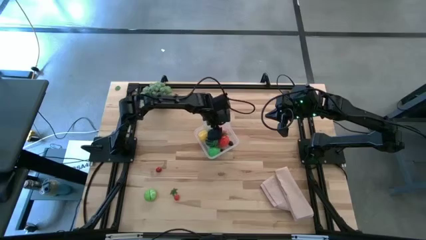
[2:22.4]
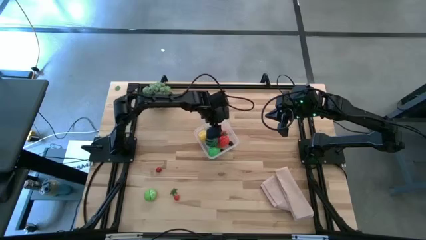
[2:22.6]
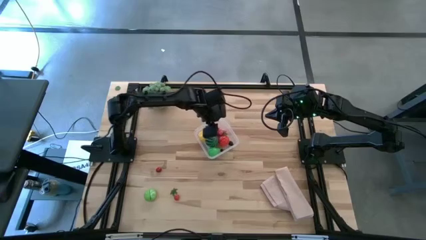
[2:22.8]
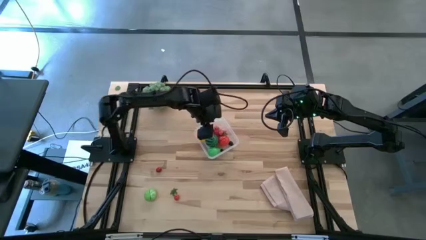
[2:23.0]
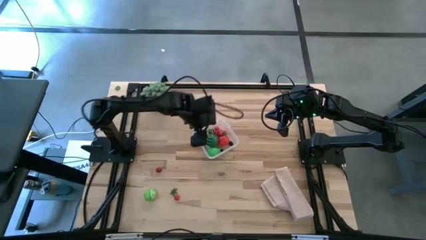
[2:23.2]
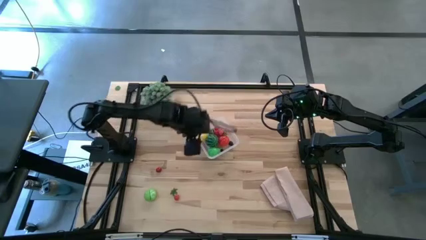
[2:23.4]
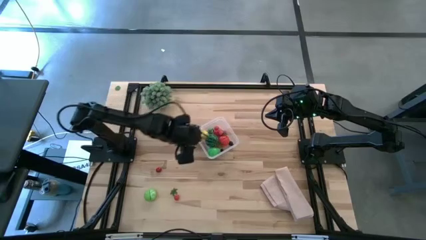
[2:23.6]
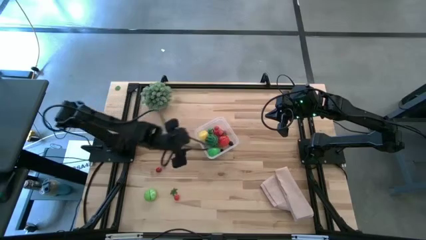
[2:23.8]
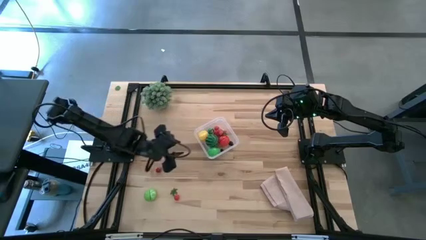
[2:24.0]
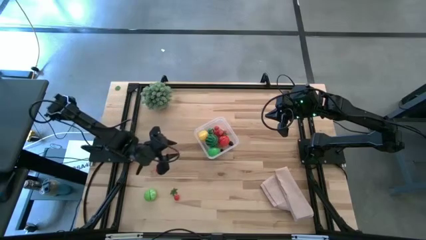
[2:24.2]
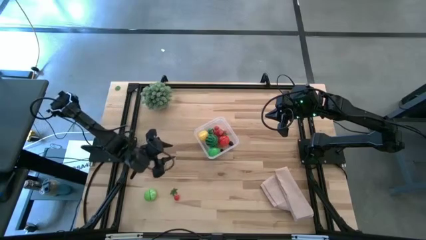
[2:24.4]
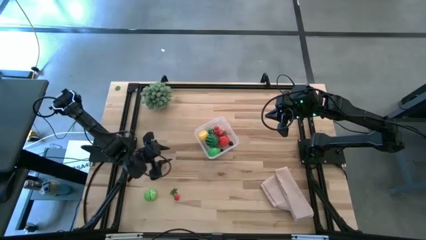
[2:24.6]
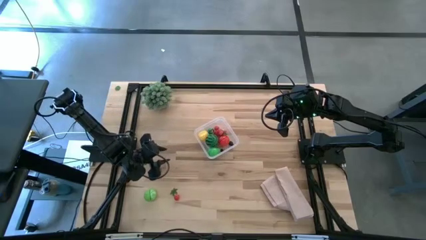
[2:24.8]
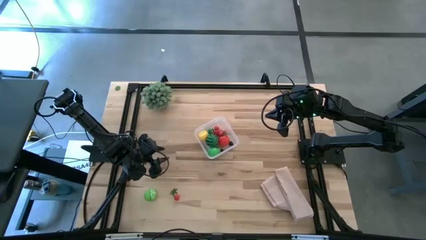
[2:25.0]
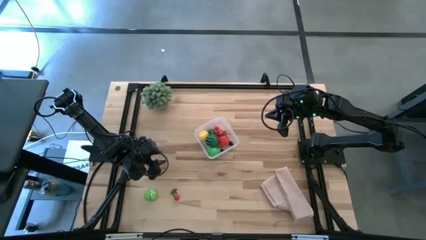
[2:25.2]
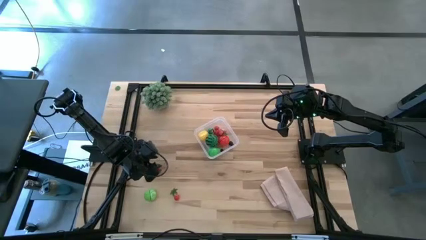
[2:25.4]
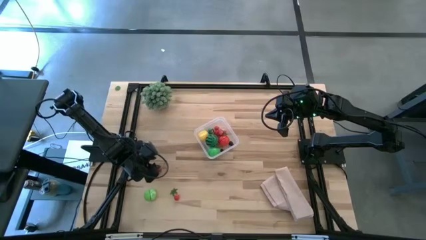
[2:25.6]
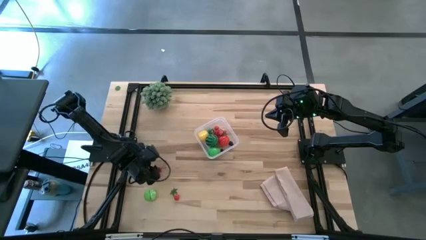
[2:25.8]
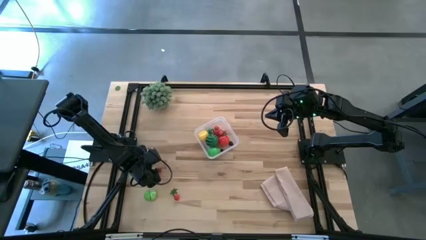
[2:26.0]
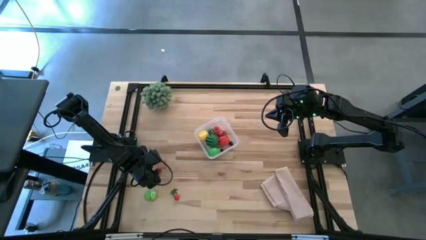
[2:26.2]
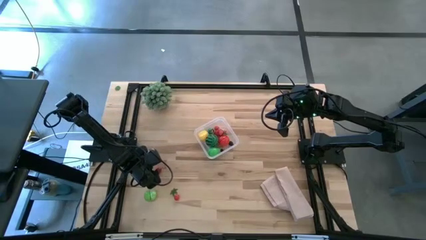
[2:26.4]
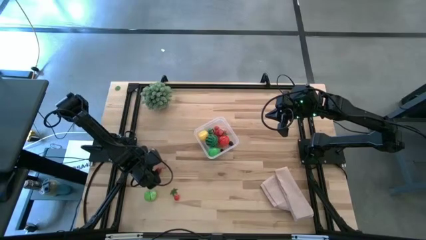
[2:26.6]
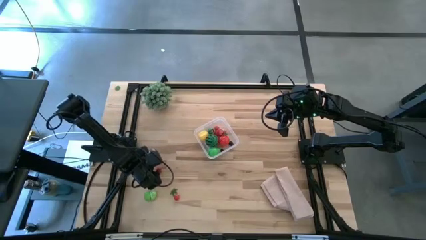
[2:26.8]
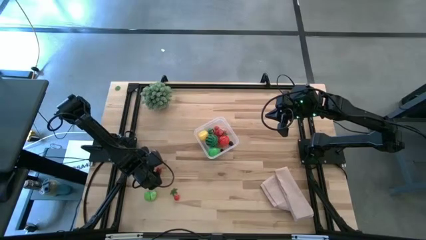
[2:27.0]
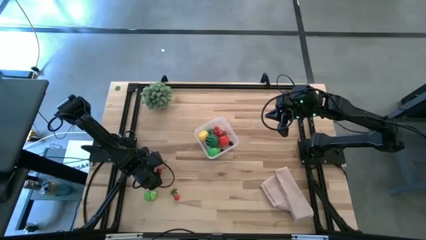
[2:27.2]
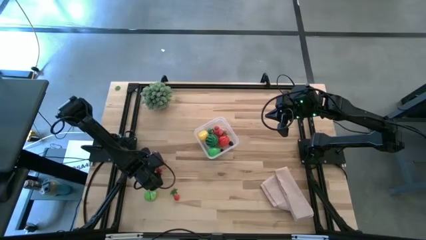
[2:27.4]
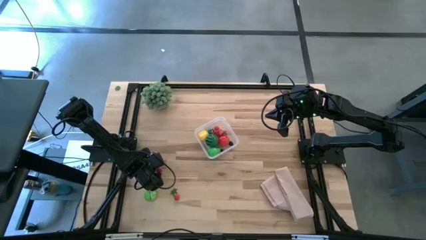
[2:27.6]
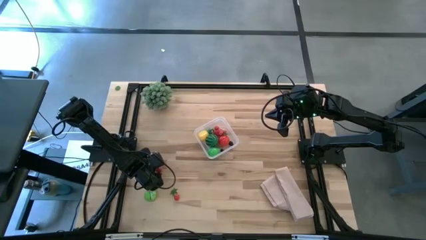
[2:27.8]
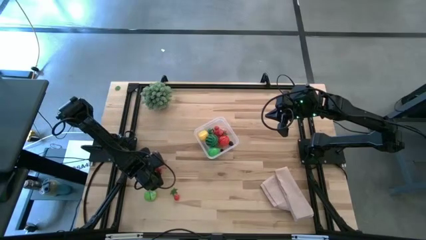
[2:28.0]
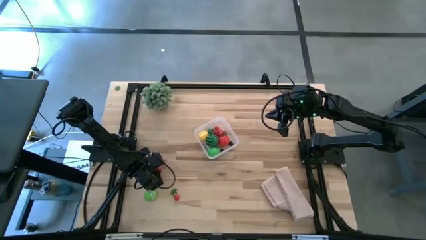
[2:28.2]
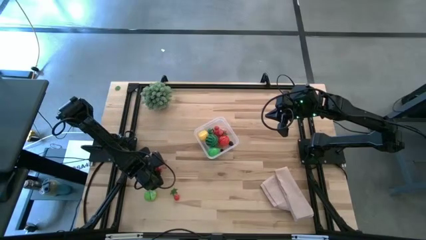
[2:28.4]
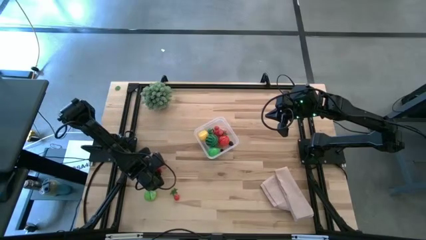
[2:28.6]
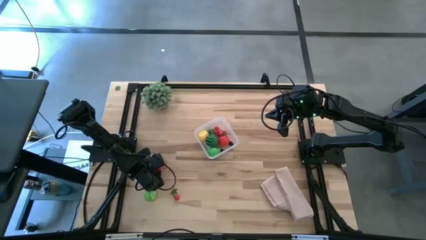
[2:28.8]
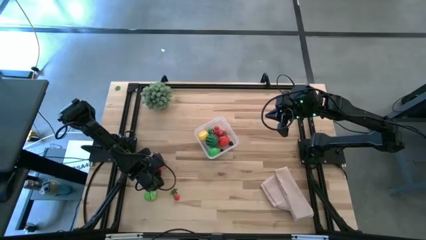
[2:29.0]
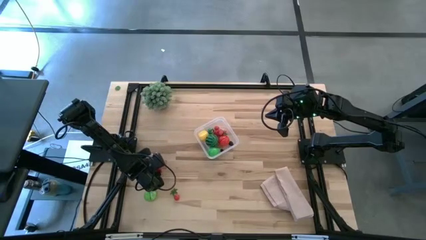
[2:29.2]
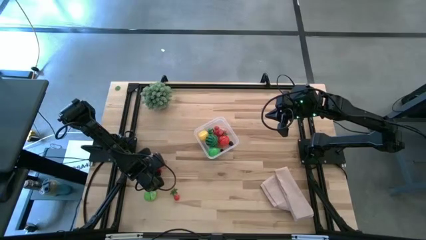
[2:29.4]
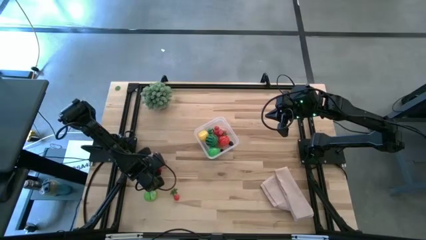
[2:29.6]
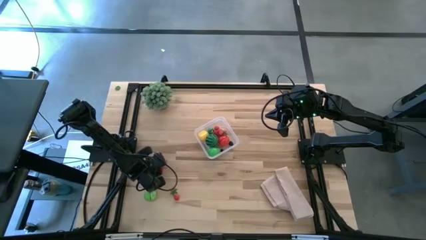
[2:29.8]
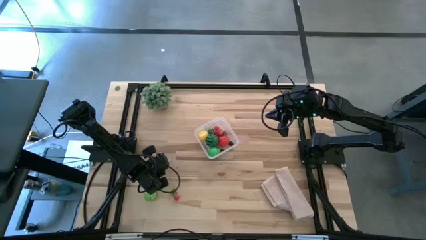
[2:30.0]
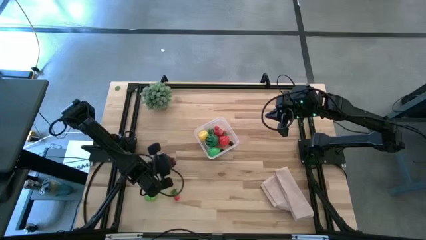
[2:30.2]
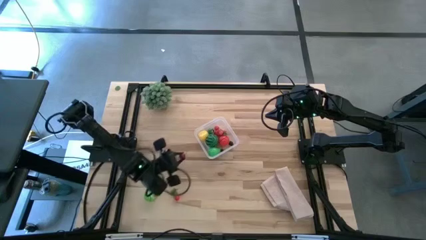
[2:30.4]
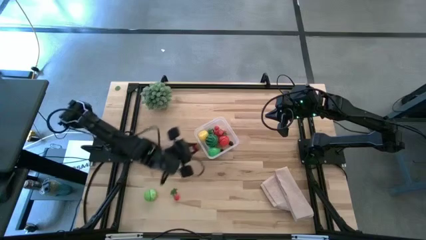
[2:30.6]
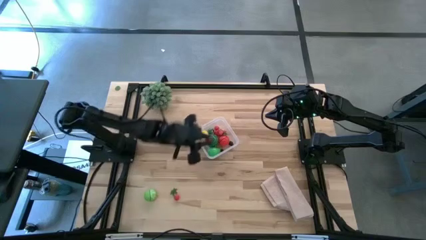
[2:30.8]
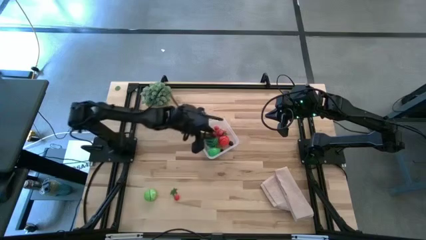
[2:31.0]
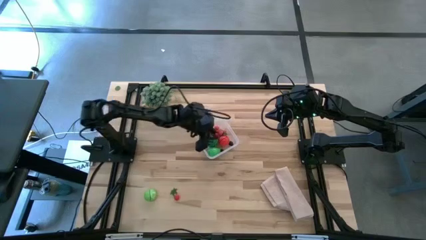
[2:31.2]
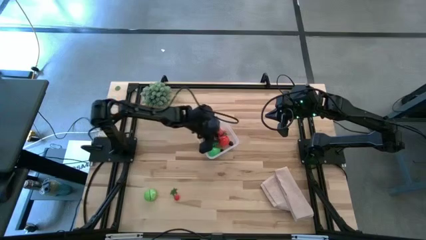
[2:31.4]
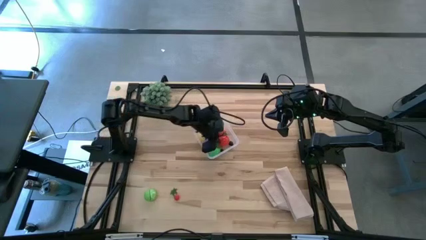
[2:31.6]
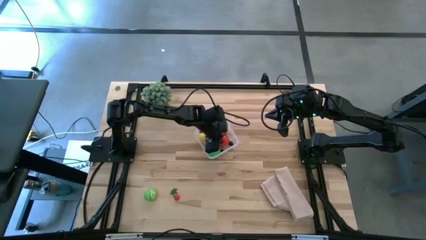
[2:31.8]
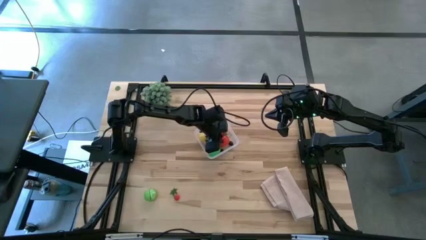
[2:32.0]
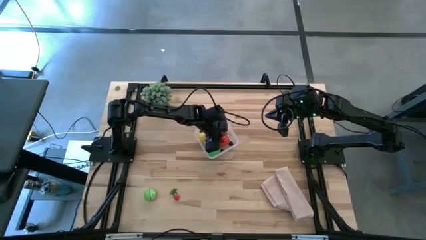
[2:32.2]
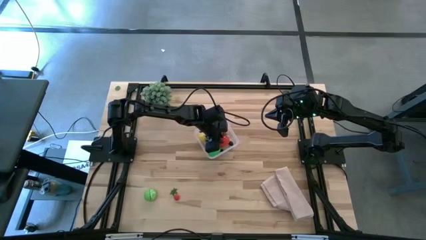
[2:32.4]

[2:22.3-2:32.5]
Task: Pick and placing Produce into tupperware
Put the red cherry into the transparent bin

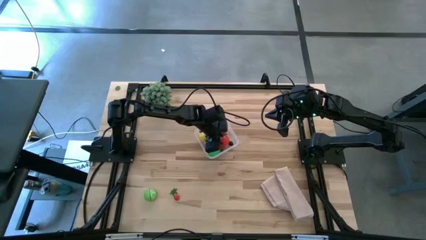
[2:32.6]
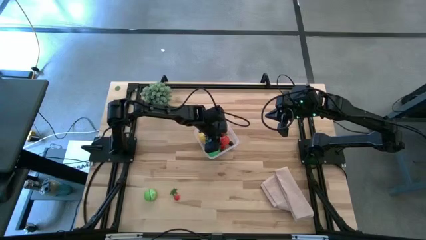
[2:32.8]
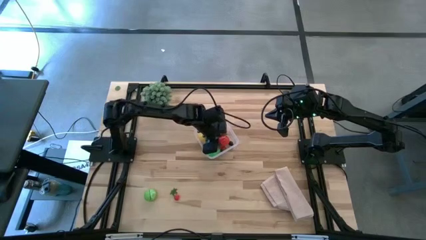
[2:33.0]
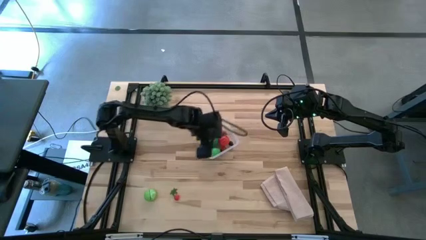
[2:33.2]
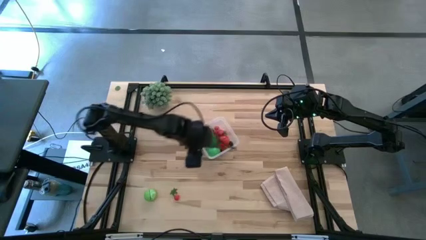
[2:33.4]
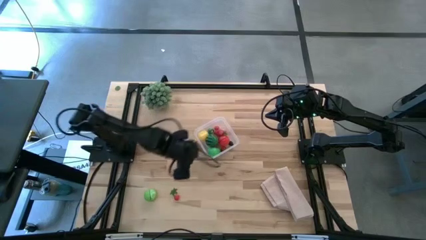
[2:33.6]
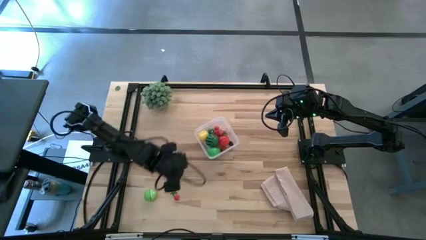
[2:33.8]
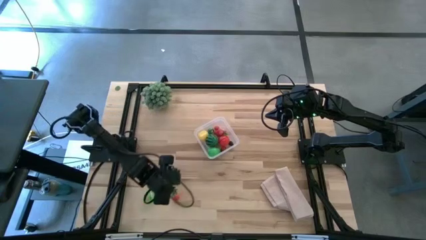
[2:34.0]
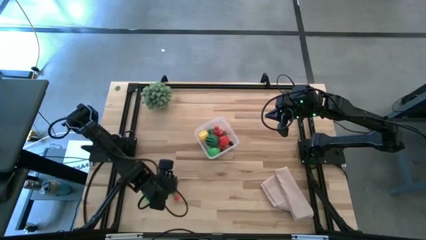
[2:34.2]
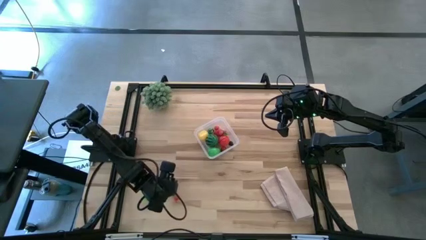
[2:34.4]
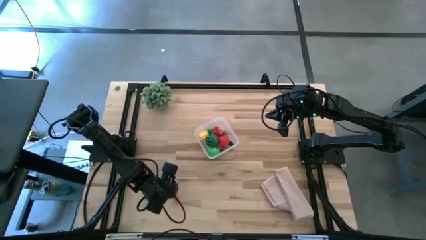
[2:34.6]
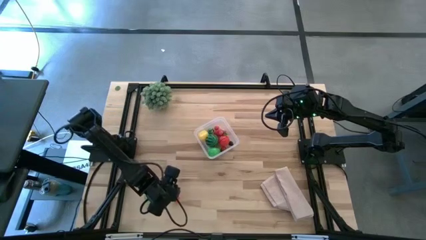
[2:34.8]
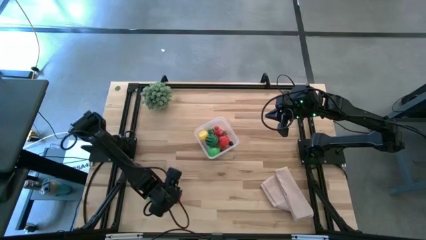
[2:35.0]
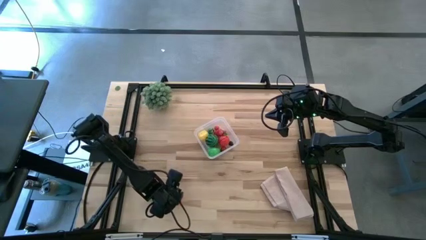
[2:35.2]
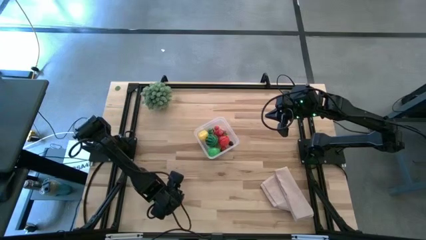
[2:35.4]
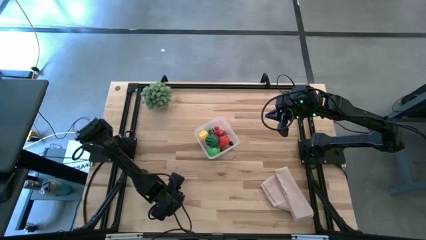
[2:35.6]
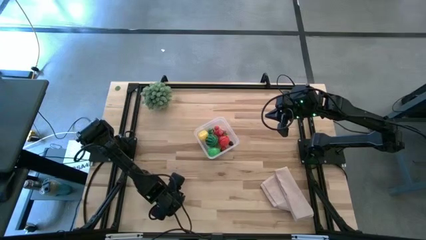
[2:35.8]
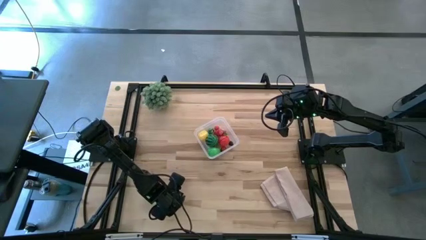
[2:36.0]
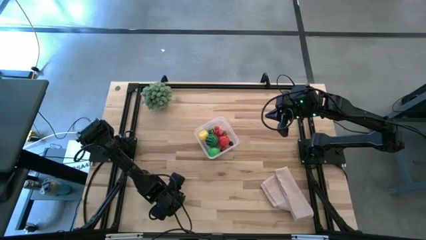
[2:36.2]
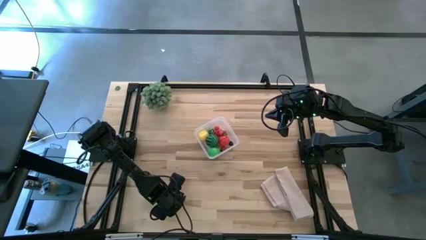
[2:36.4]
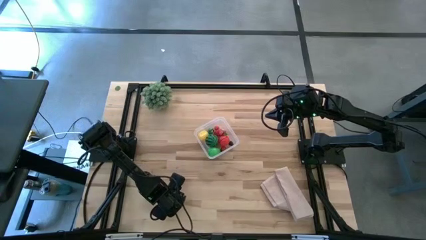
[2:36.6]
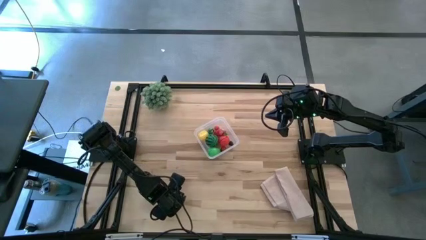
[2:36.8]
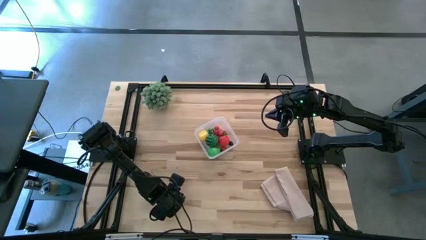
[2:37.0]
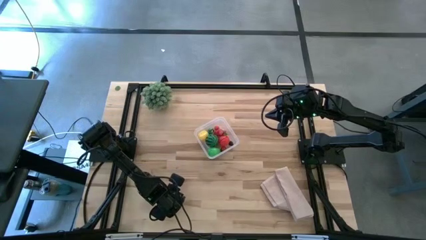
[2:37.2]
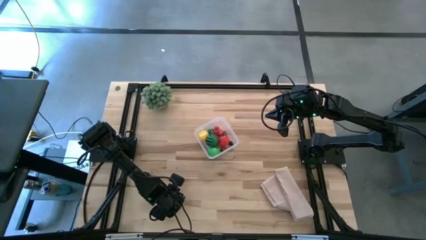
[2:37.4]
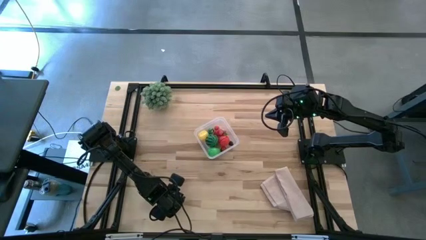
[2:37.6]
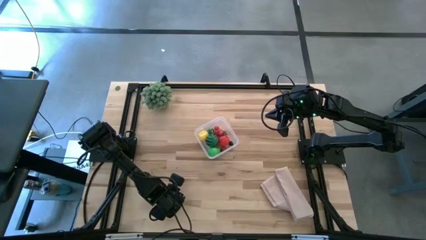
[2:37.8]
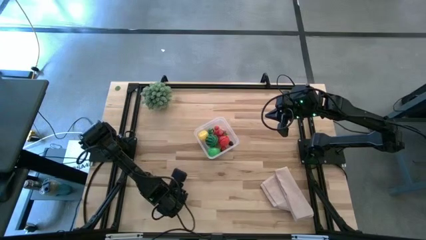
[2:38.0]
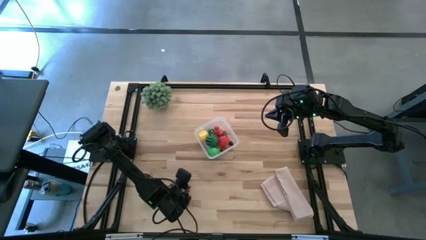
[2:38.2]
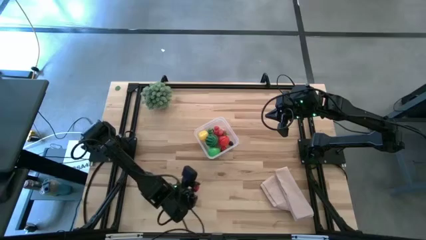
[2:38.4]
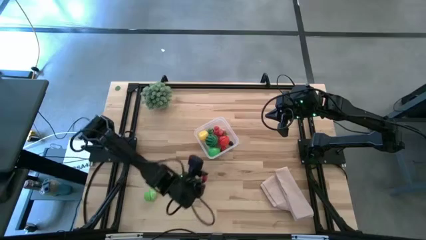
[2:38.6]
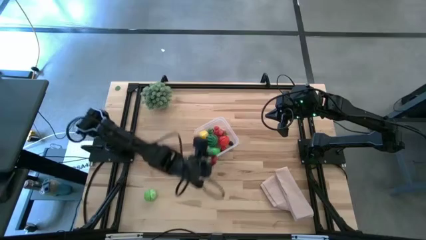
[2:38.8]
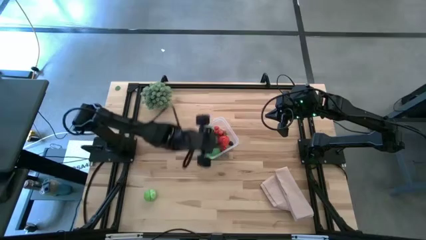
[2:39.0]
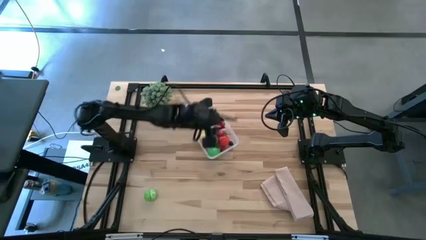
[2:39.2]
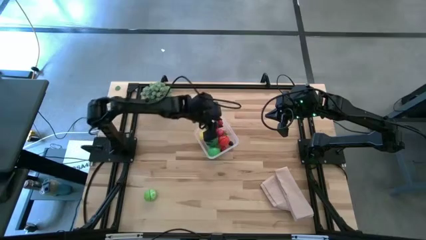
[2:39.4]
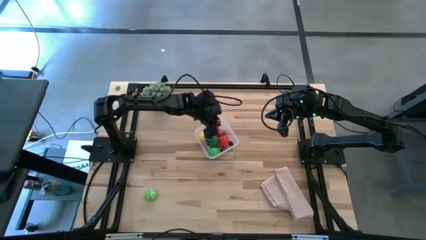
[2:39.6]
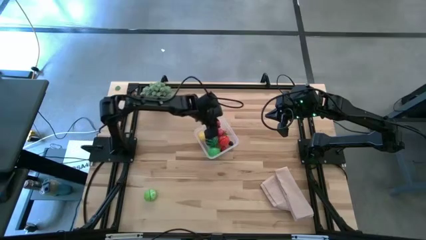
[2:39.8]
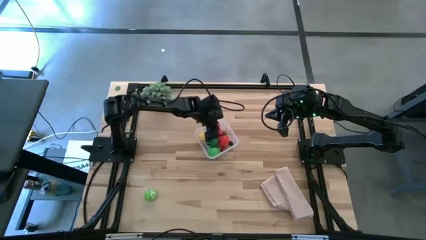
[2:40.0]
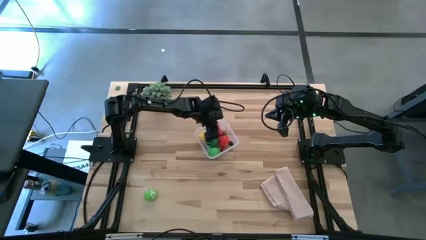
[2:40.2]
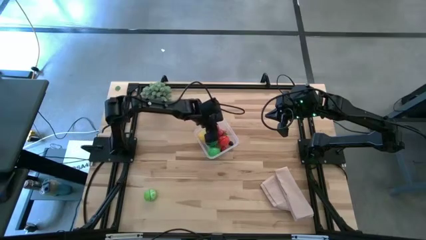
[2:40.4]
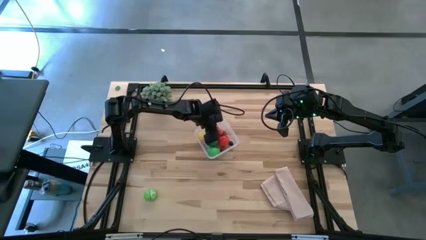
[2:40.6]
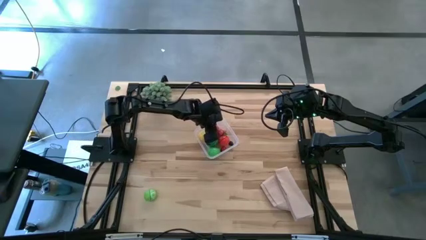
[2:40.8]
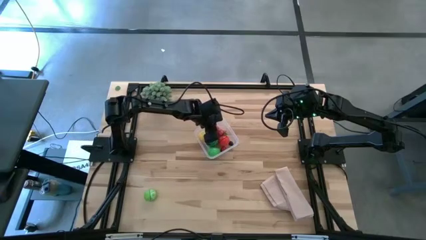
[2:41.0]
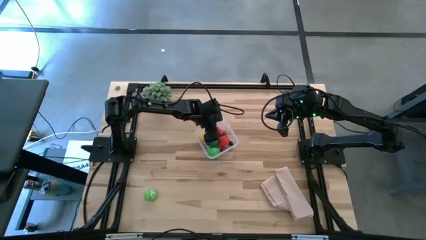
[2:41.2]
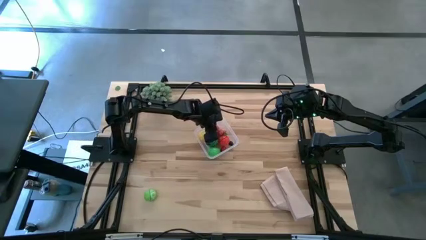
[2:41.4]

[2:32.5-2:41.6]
Put the red cherry into the transparent bin
